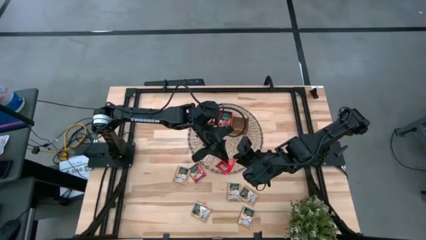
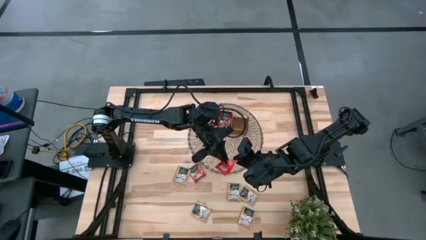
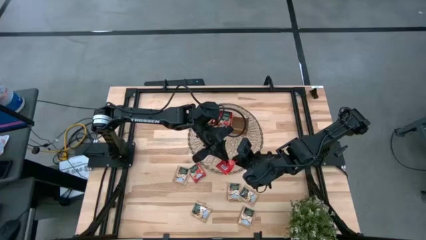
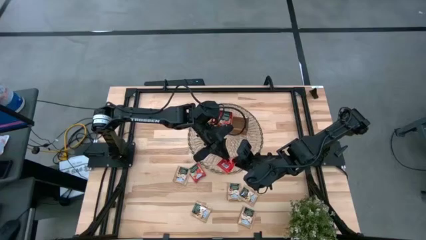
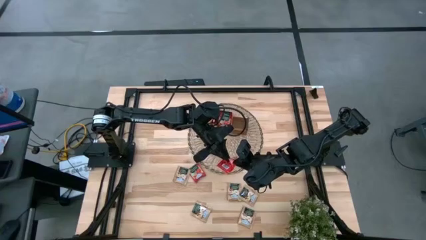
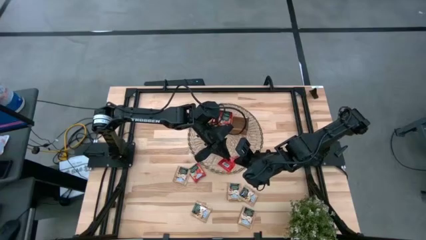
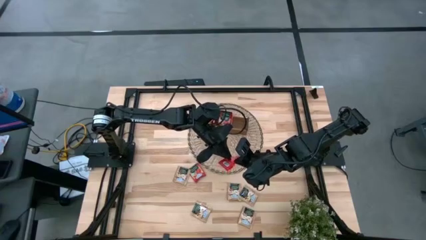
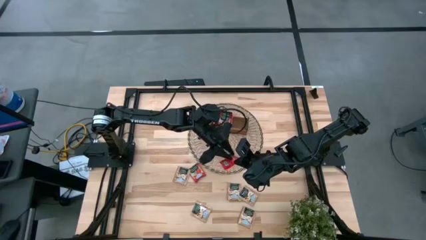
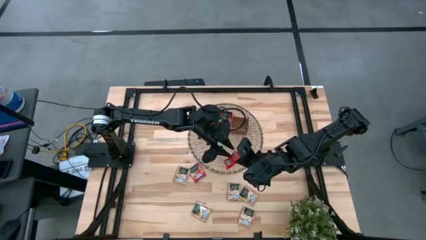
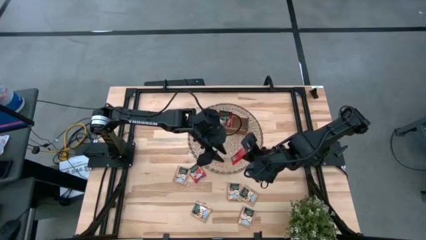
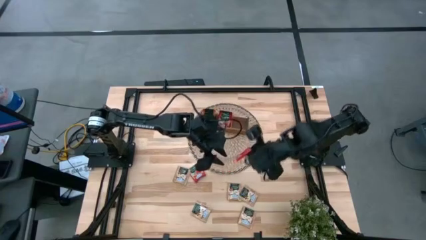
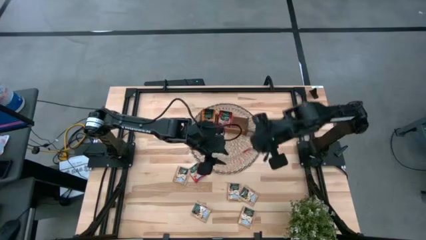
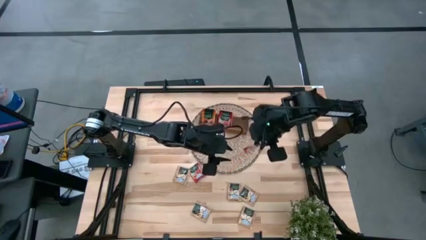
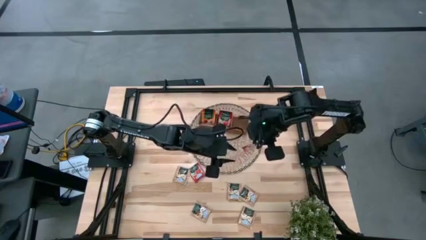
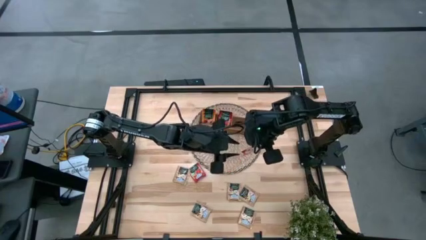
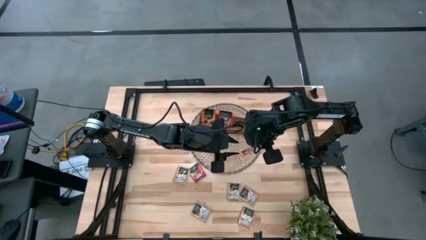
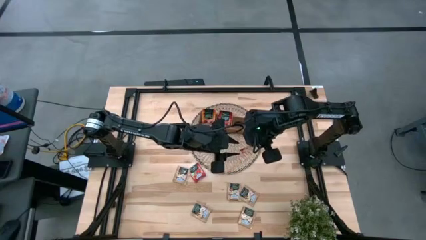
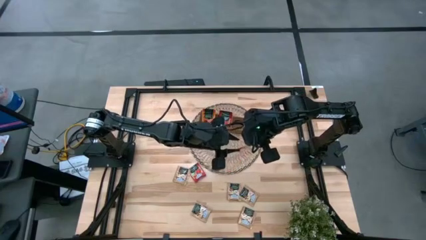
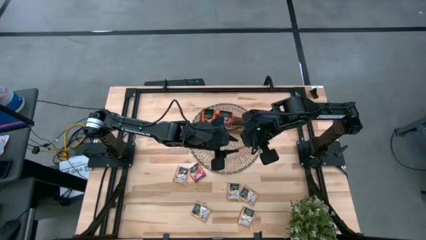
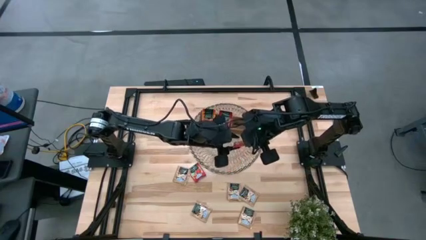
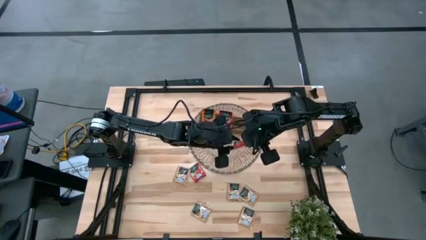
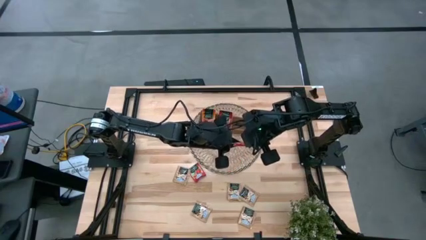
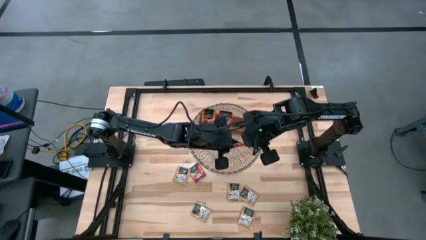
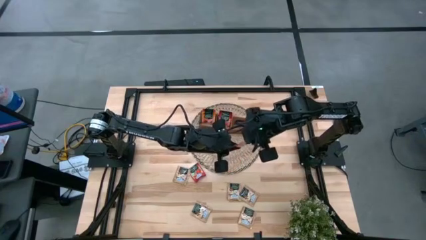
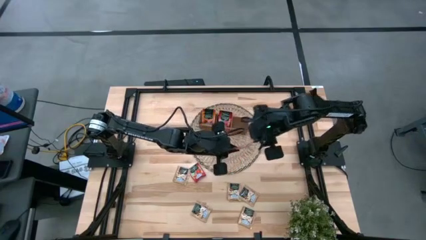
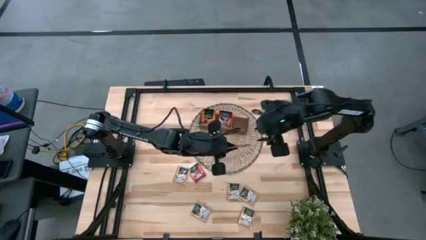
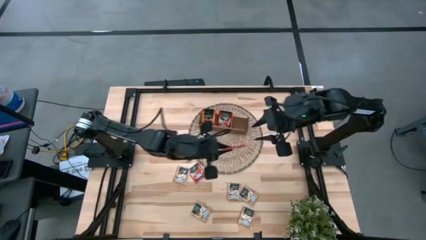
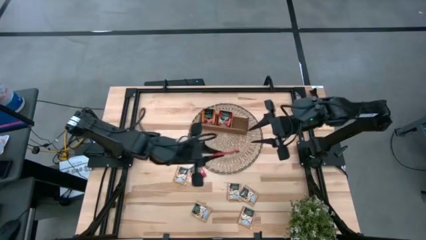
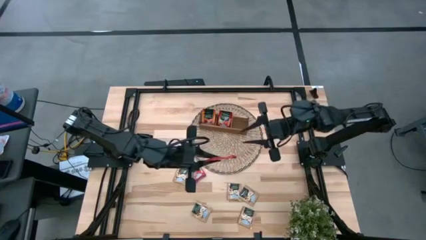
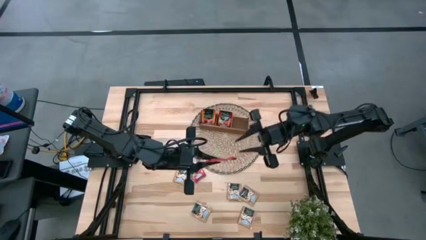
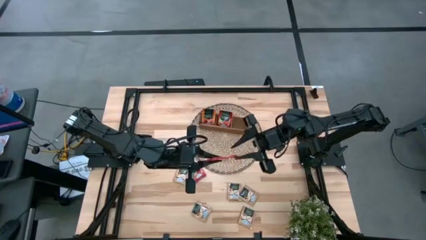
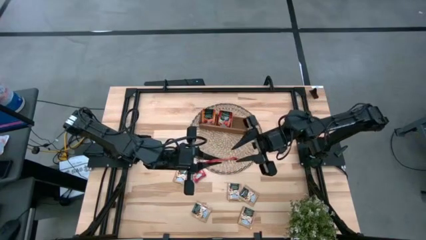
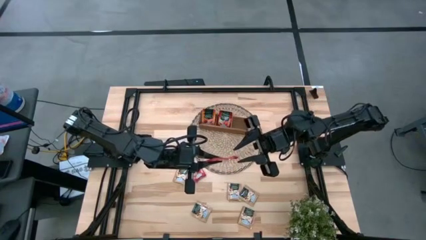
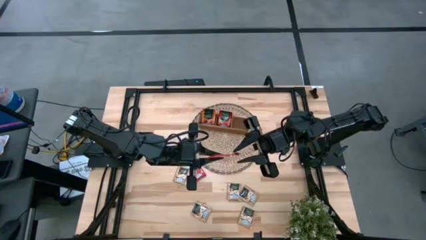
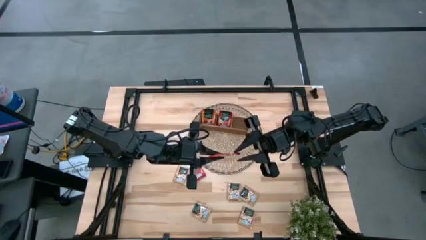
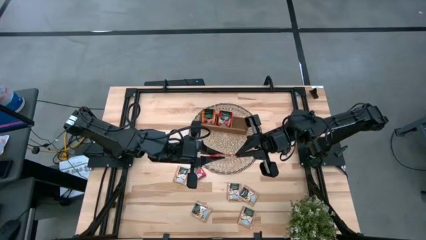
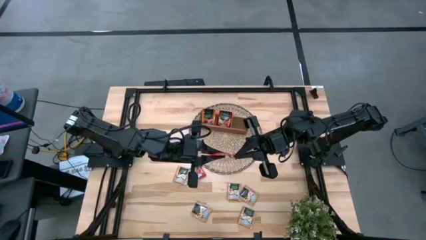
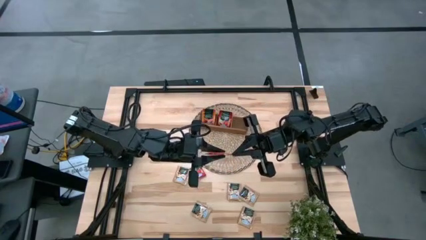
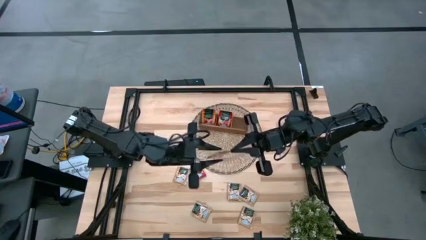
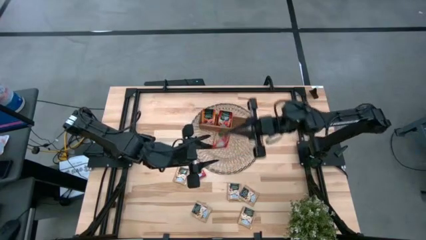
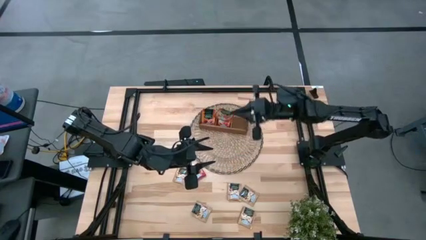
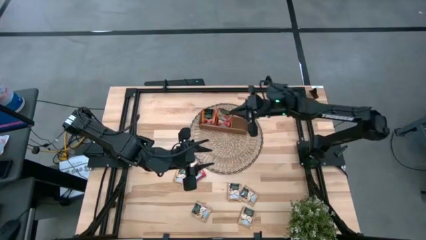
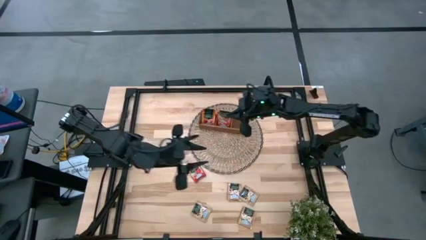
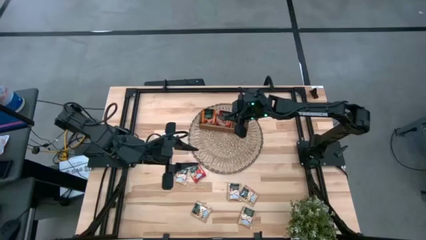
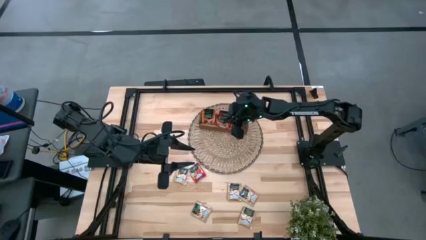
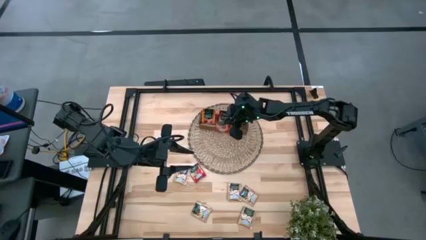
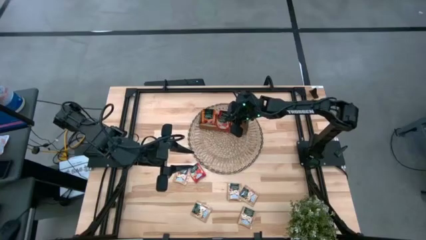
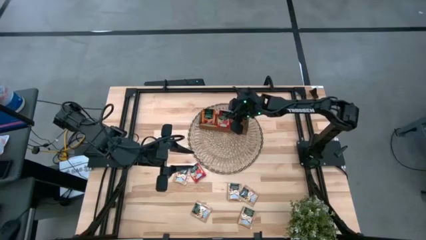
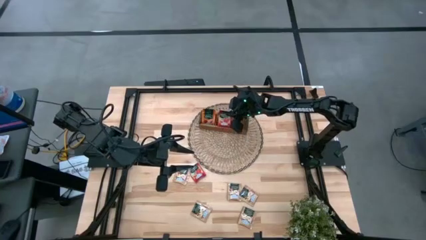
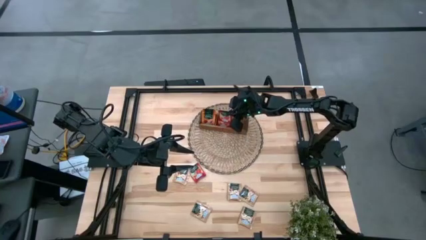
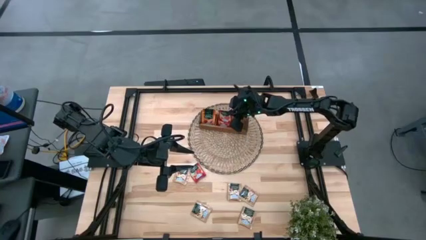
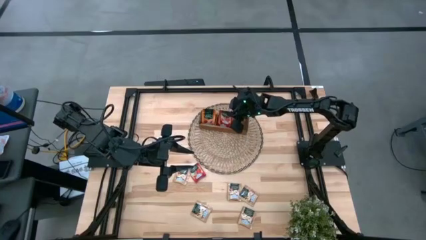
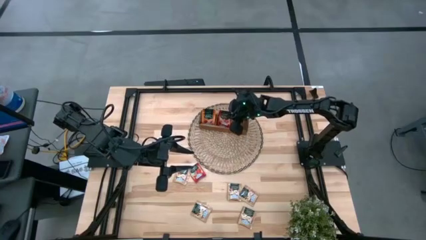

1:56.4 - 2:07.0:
Task: Pick & Place Tea
Put the red tea bag into the middle section of the wooden organizer

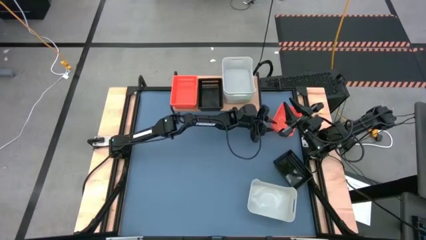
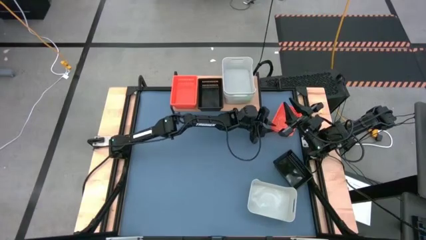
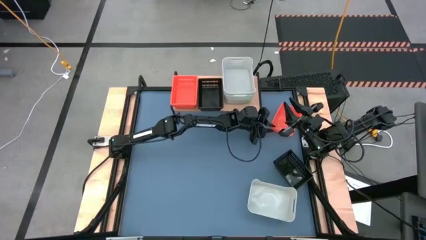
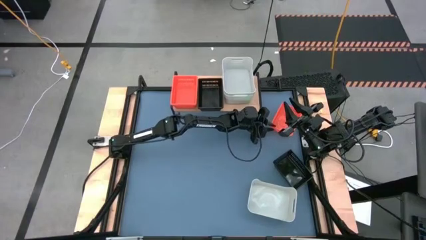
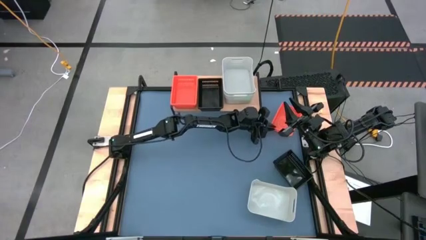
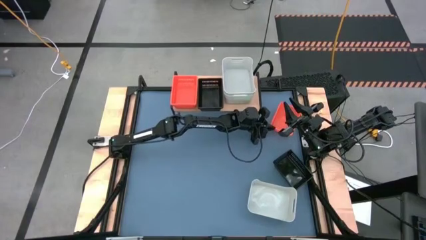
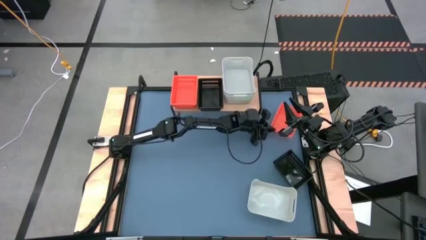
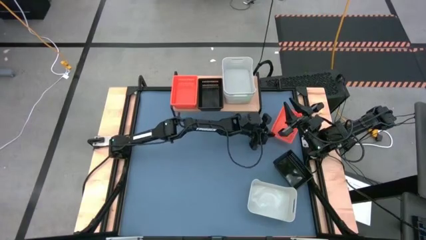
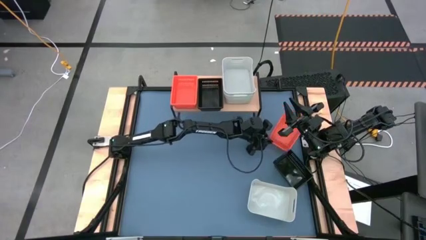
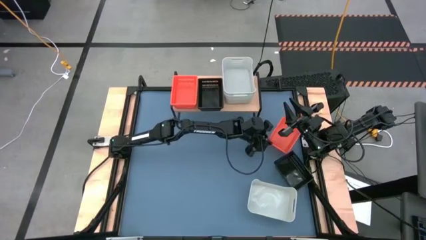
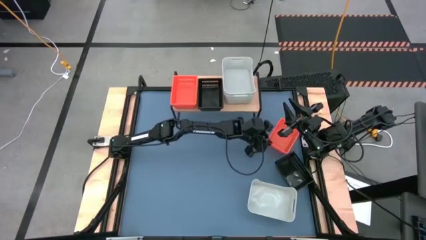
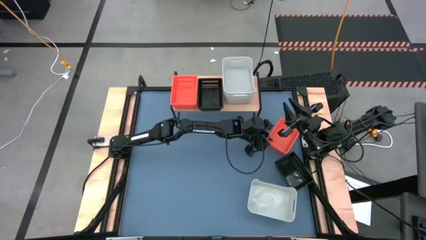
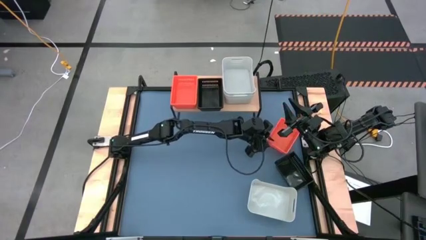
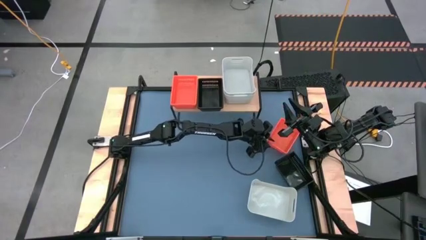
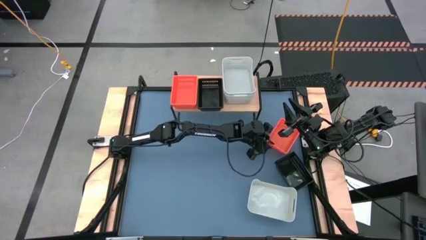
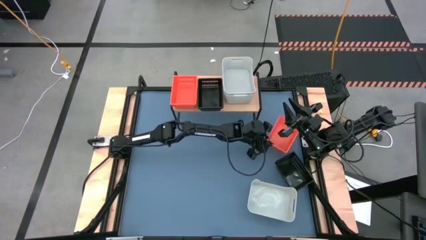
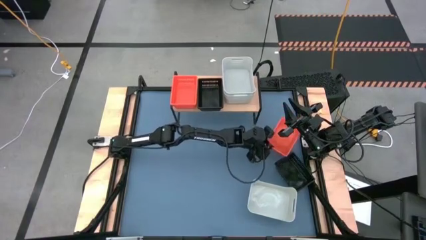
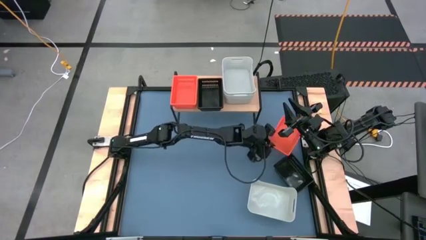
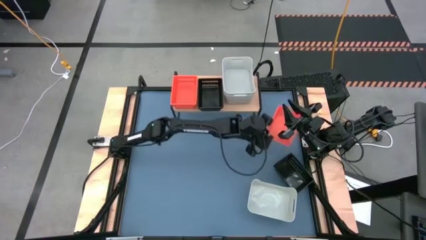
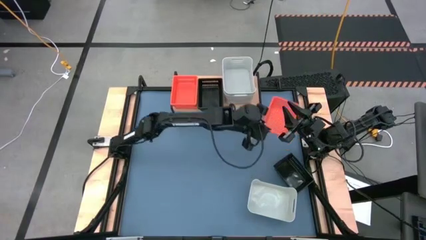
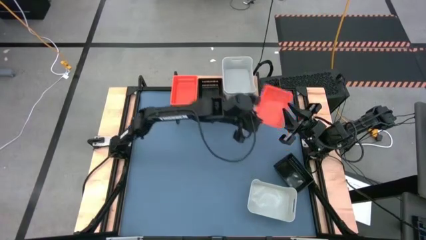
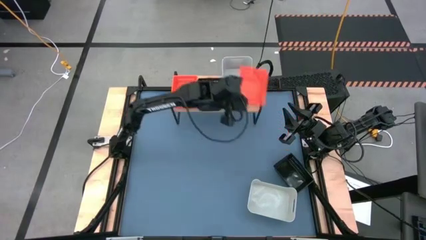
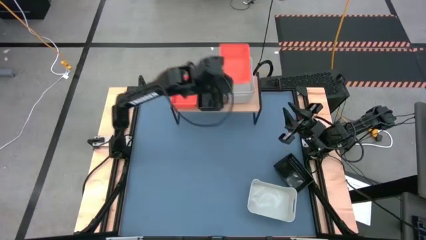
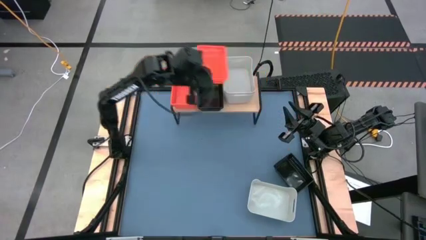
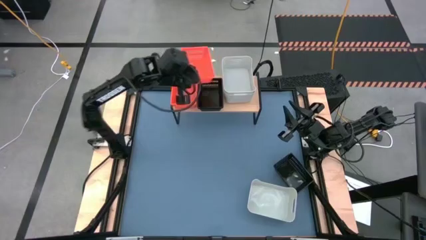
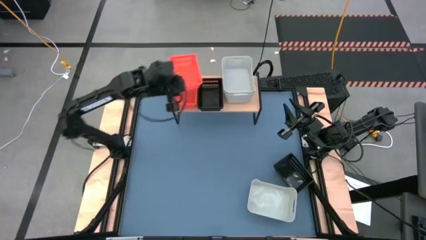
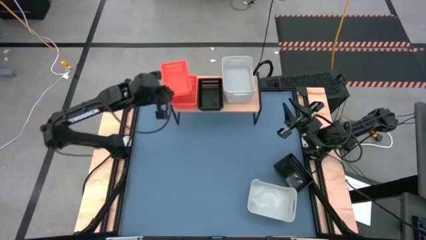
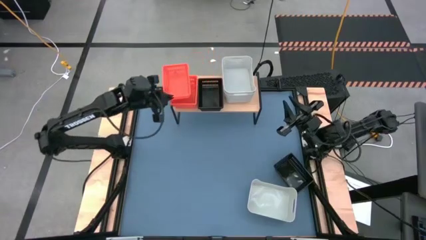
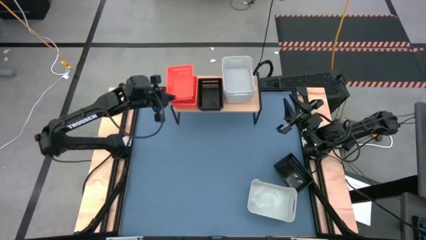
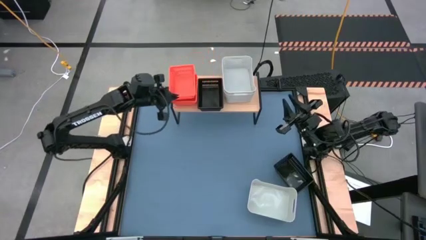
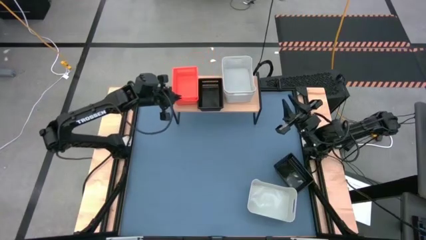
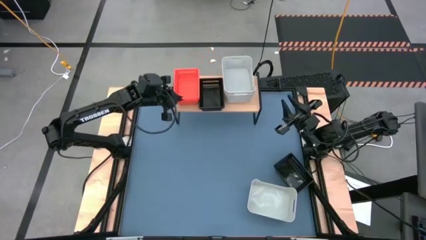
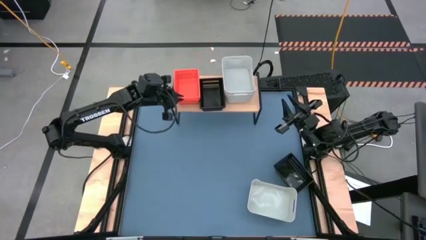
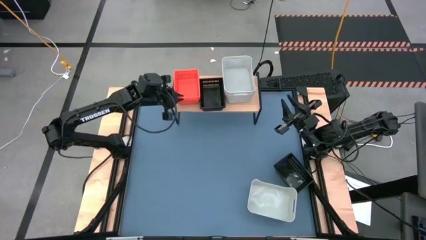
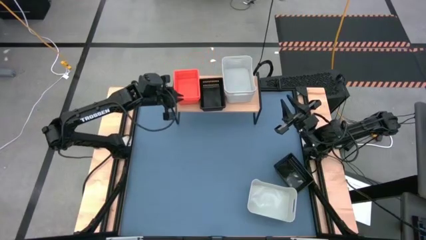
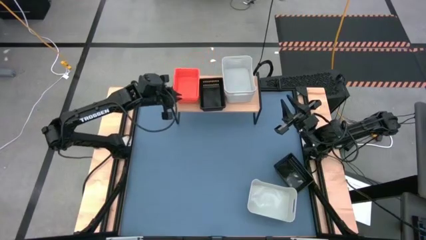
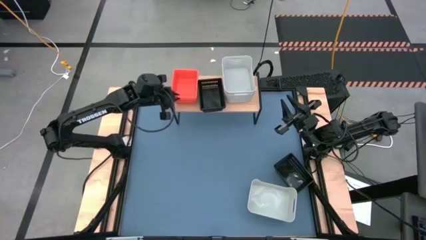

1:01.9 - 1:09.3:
Task: Stack baskets on shelf by color
Stack the orange bin on top of the other orange bins on the shelf

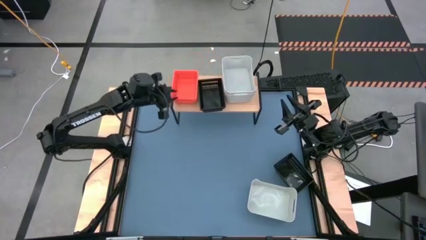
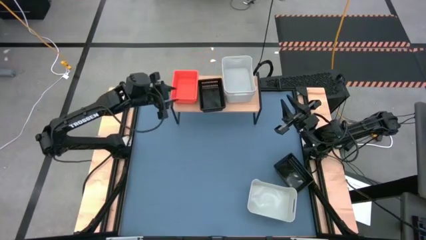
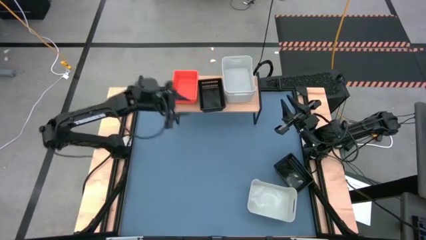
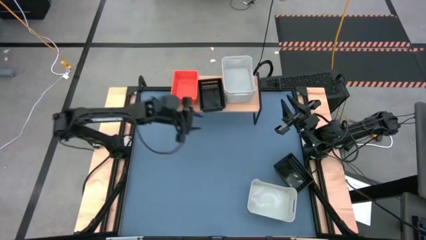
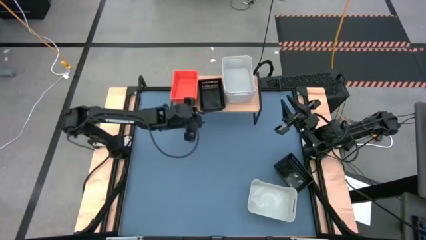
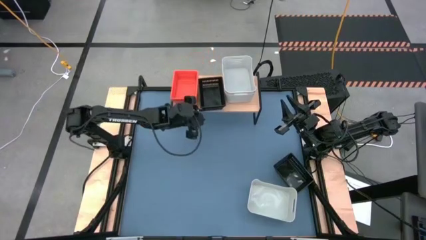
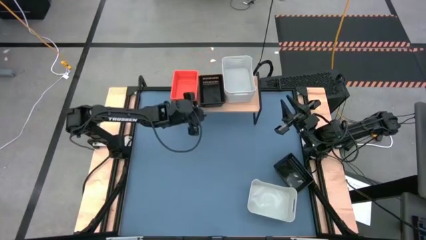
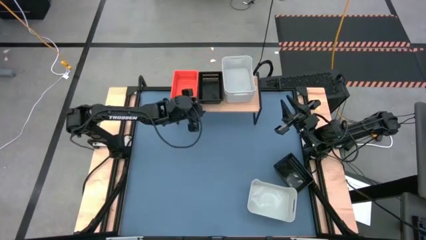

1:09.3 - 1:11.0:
Adjust the black bins on the shelf
